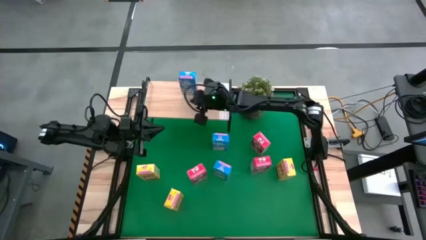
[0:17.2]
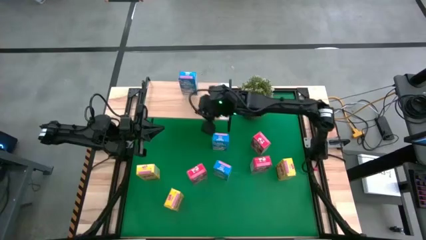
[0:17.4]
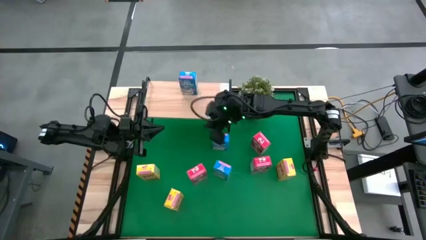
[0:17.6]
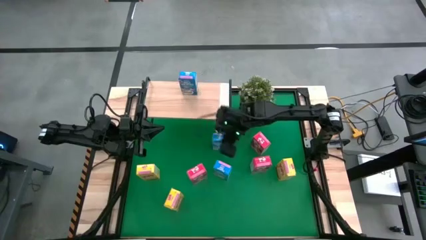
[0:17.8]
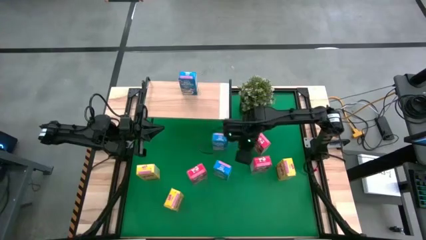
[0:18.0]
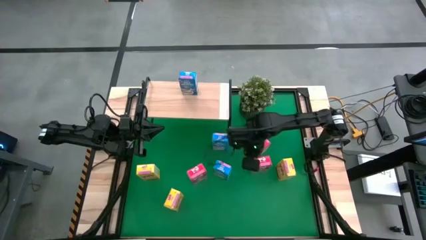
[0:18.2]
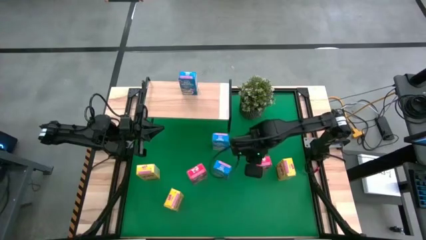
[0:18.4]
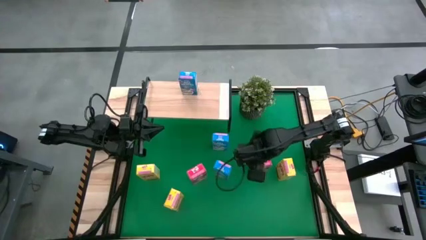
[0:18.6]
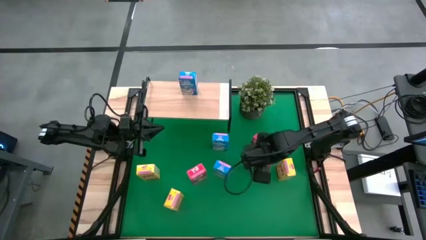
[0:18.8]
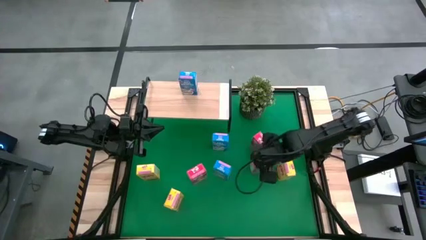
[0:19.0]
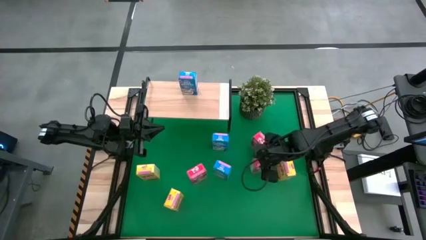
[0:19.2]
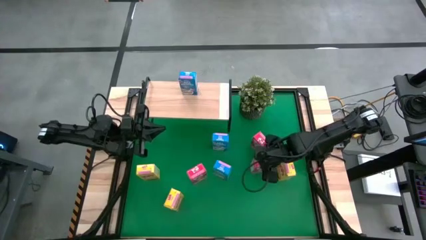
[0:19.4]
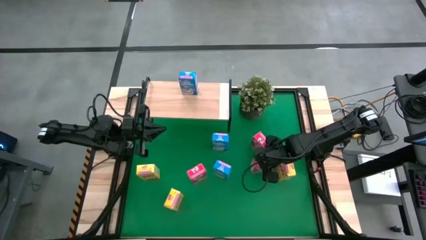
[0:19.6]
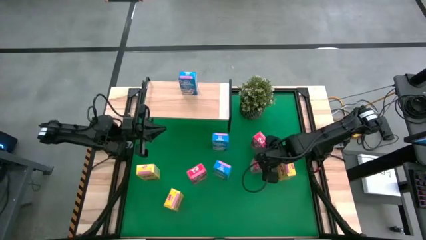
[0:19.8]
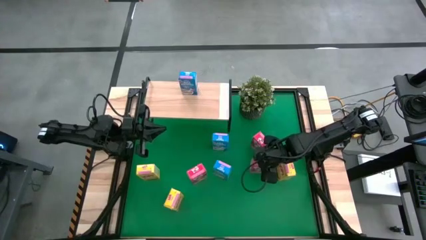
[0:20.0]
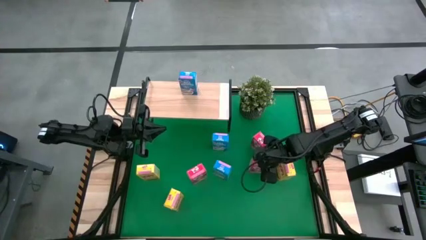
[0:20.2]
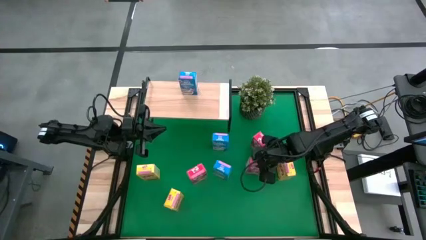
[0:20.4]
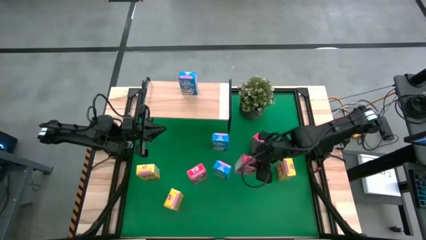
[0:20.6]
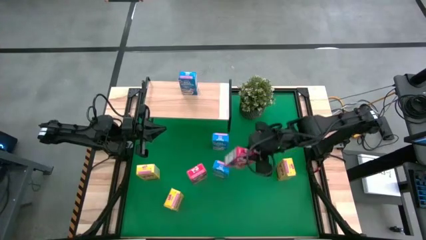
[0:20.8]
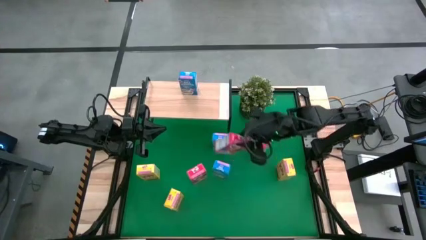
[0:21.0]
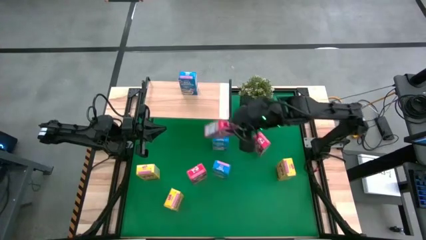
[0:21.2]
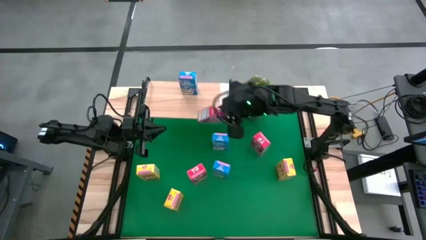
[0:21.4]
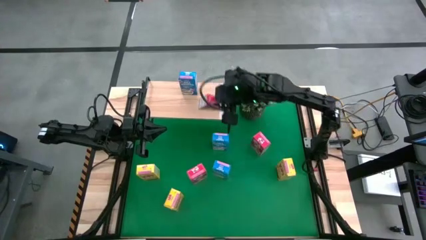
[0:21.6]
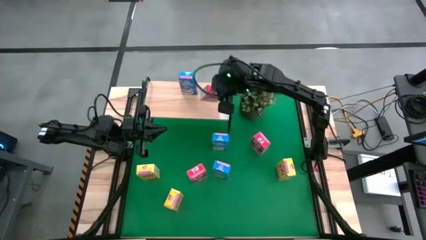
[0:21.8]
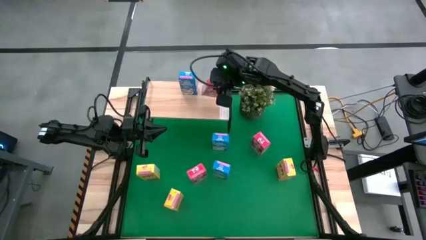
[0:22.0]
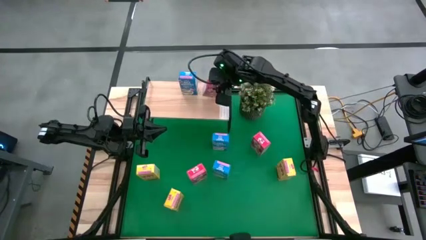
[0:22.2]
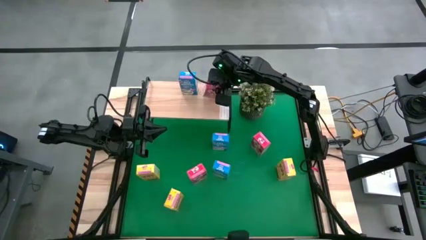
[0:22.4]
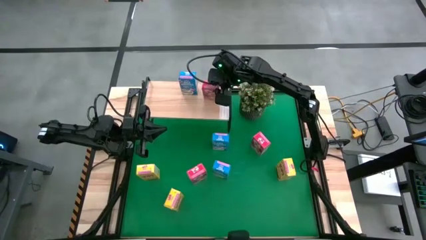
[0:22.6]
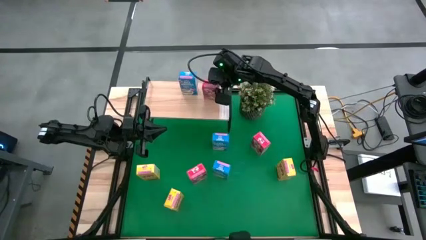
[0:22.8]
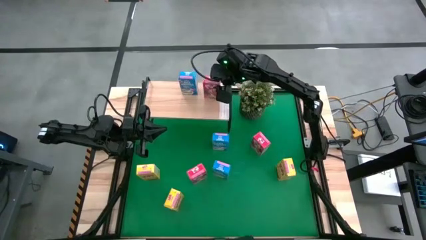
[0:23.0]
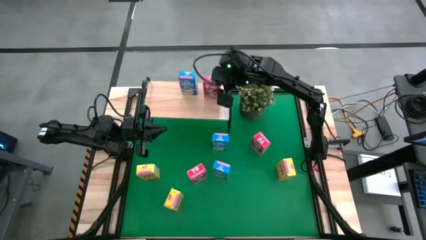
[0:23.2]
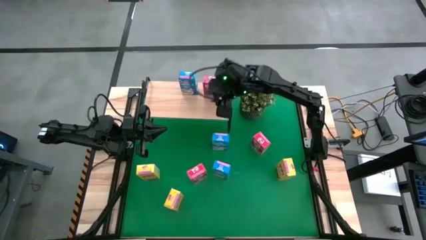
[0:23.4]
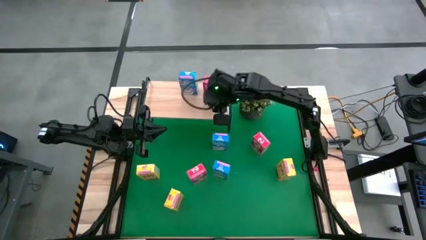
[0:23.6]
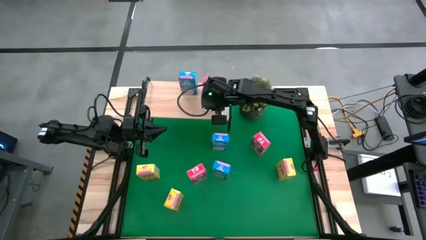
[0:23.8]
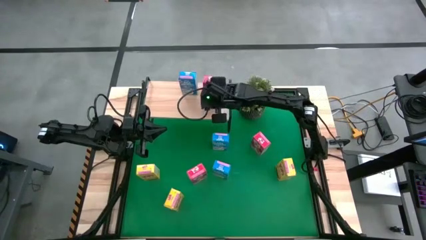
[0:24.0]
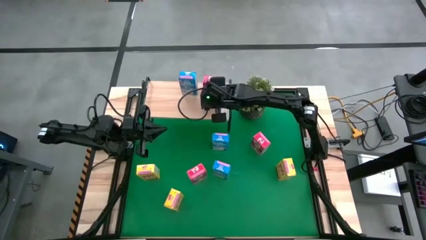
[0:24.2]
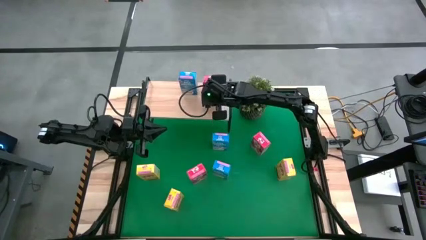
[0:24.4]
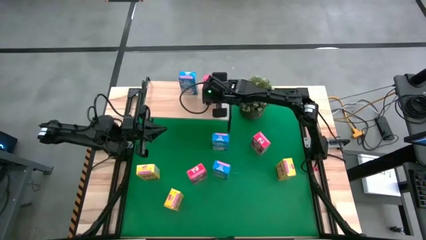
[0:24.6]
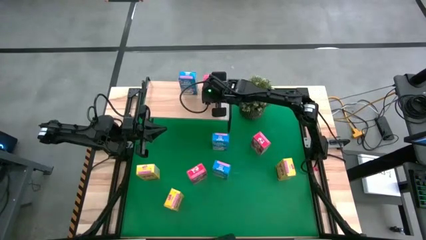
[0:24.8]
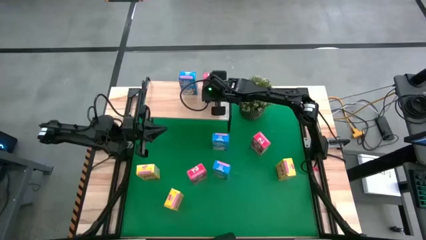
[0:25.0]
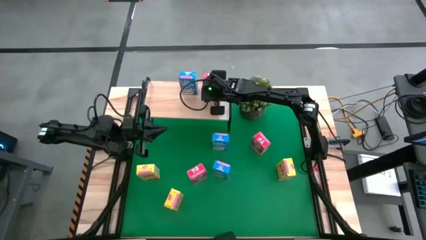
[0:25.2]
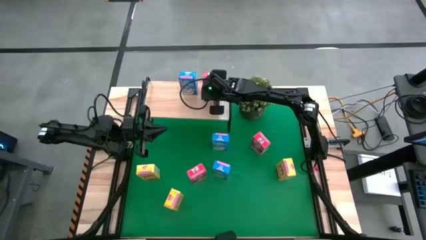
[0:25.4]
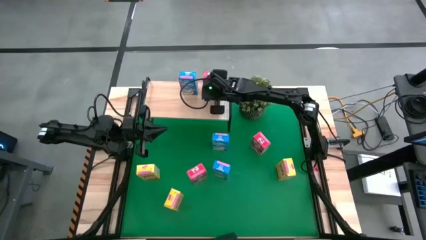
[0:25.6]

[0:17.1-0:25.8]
Task: Stack cereal on shelf
Put the bottom right red cereal box on the shelf

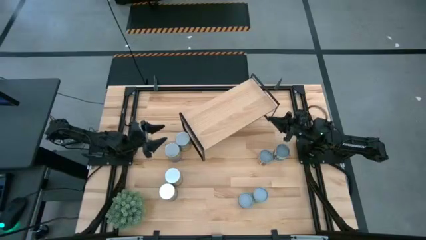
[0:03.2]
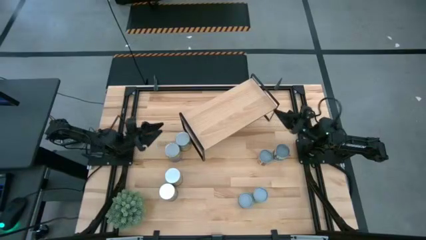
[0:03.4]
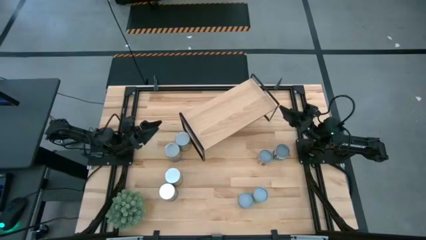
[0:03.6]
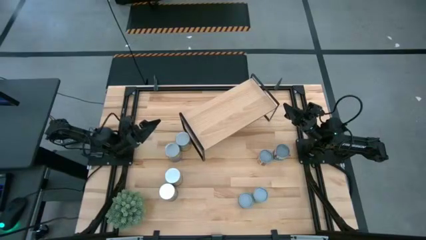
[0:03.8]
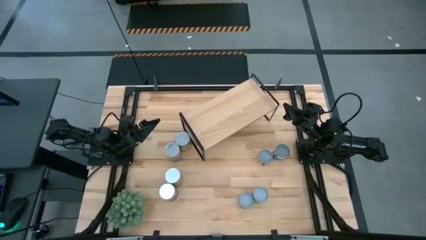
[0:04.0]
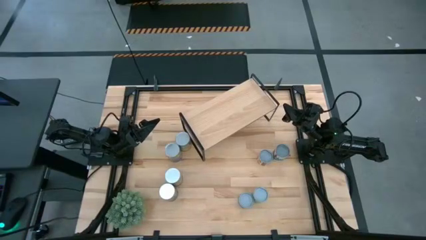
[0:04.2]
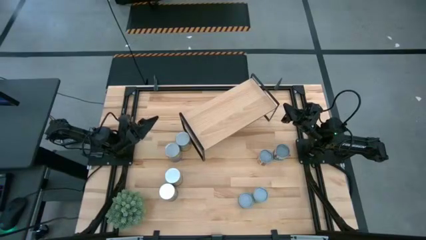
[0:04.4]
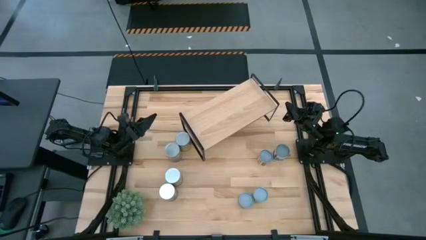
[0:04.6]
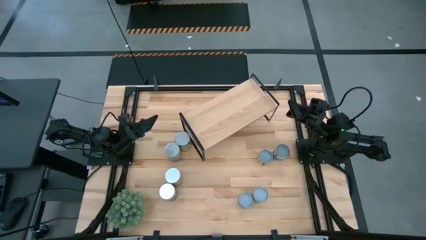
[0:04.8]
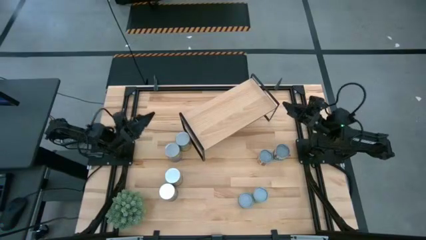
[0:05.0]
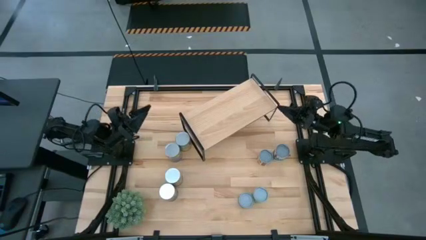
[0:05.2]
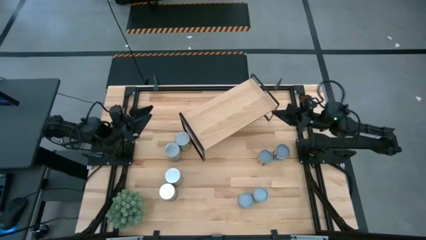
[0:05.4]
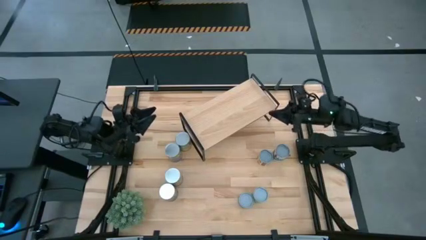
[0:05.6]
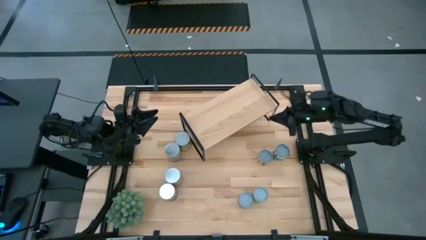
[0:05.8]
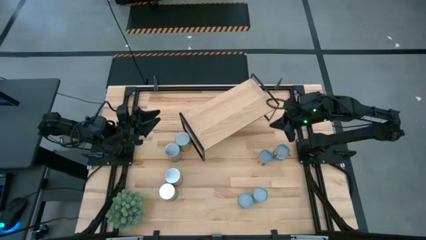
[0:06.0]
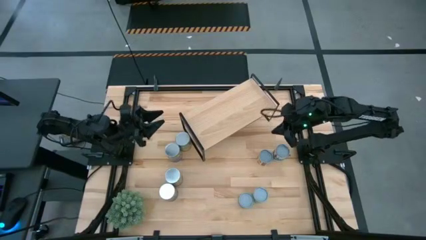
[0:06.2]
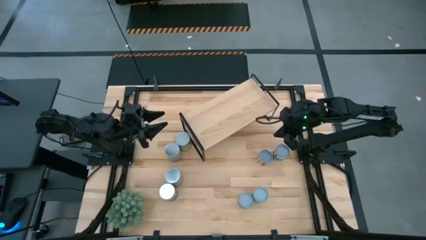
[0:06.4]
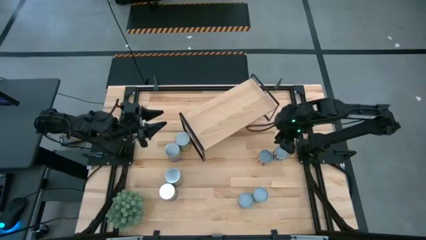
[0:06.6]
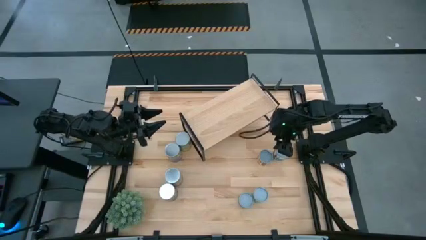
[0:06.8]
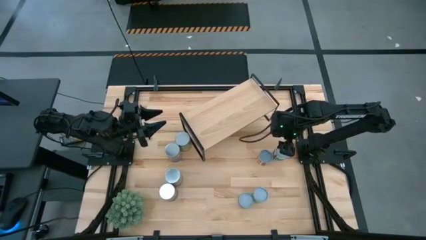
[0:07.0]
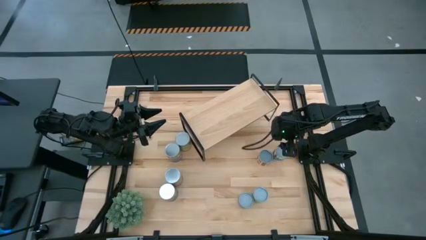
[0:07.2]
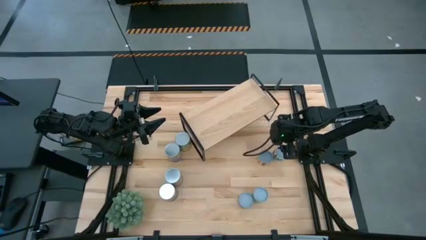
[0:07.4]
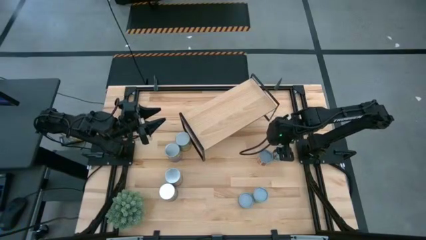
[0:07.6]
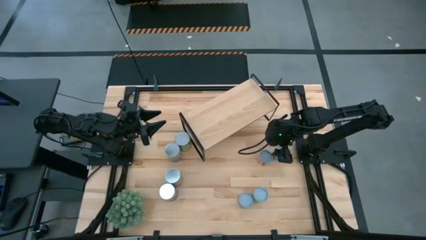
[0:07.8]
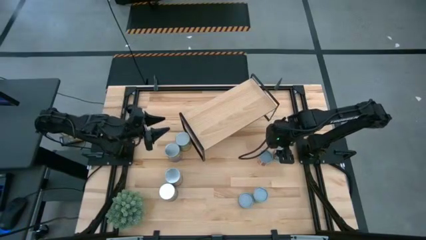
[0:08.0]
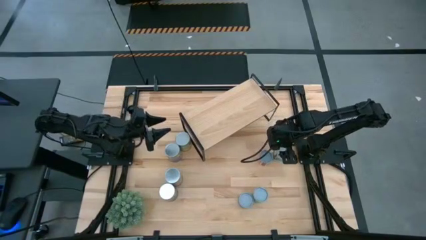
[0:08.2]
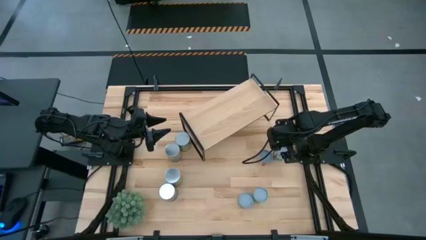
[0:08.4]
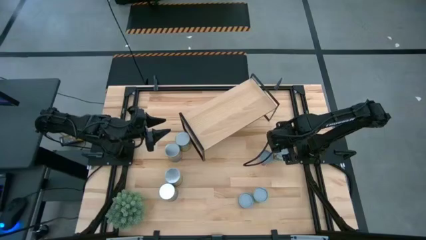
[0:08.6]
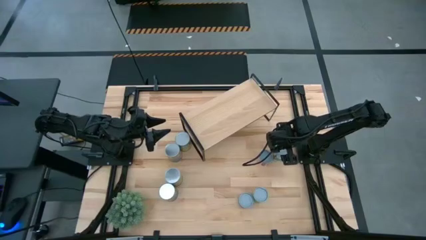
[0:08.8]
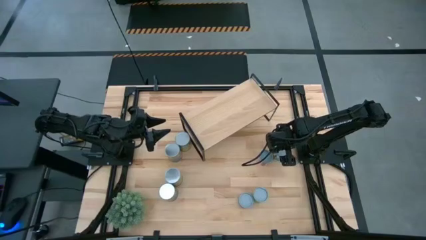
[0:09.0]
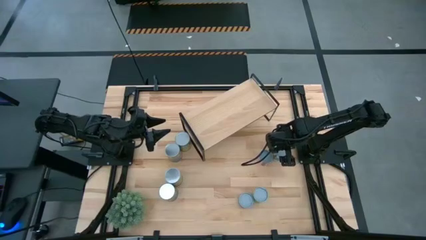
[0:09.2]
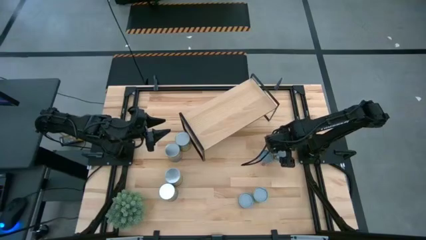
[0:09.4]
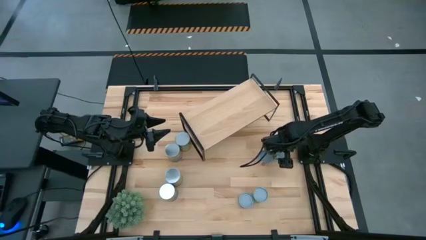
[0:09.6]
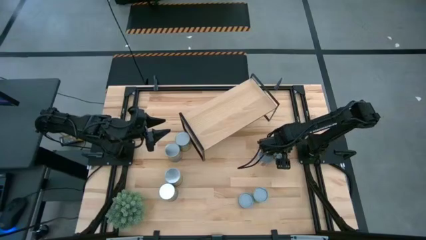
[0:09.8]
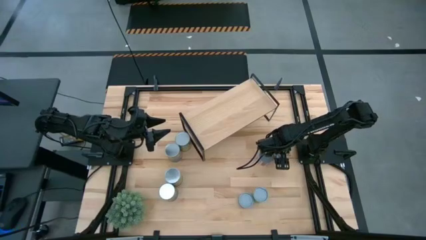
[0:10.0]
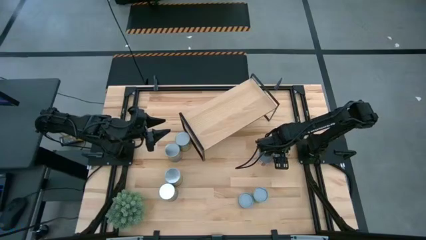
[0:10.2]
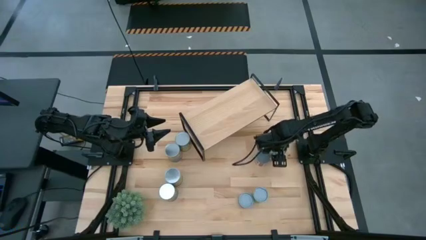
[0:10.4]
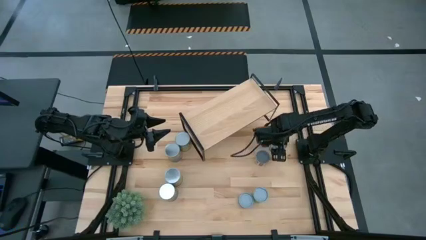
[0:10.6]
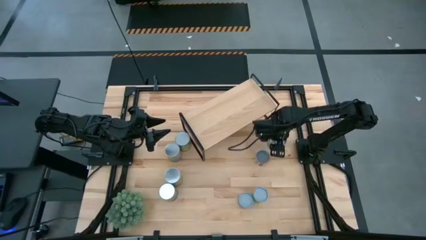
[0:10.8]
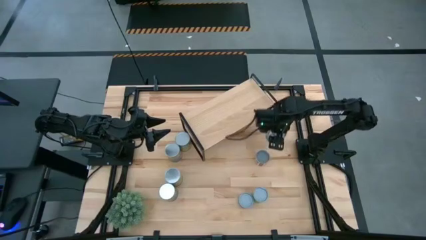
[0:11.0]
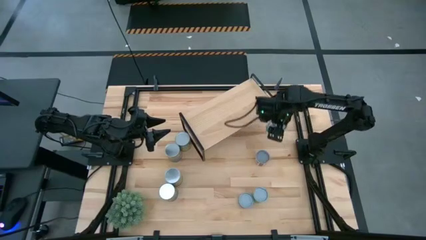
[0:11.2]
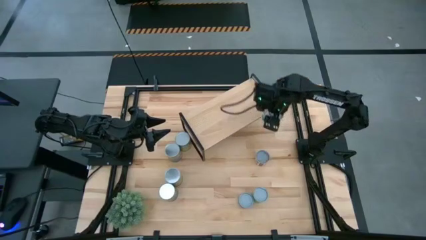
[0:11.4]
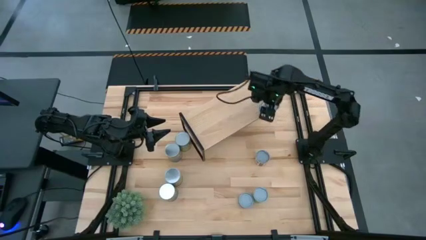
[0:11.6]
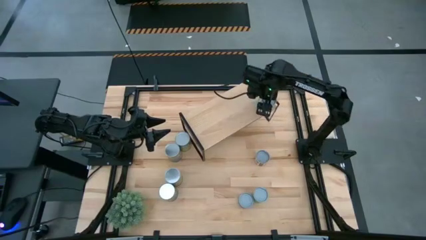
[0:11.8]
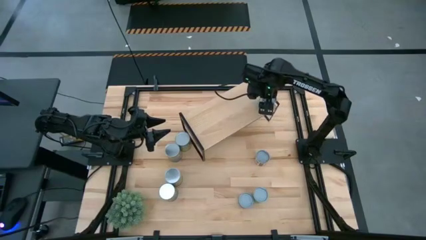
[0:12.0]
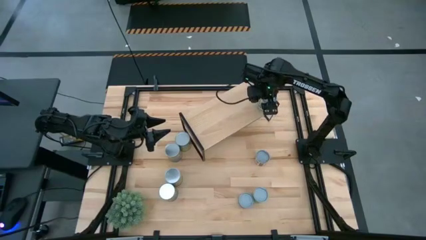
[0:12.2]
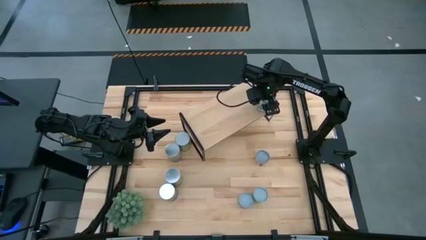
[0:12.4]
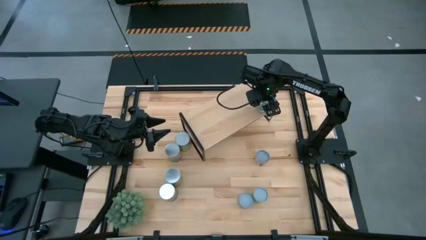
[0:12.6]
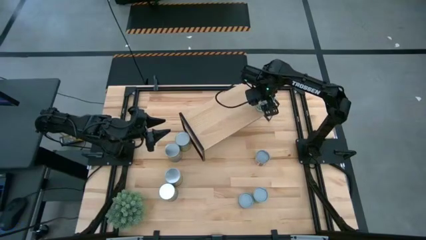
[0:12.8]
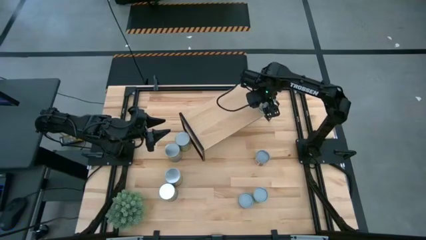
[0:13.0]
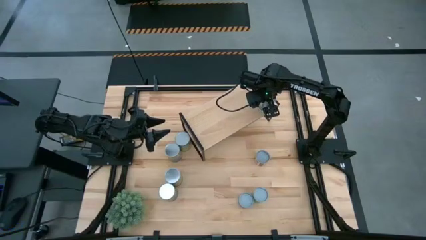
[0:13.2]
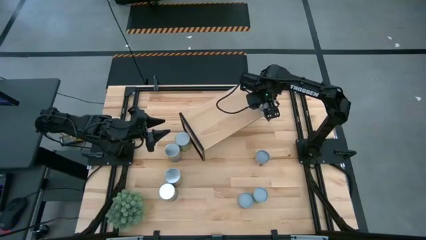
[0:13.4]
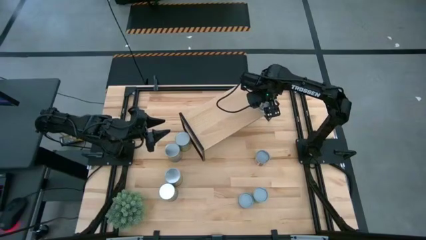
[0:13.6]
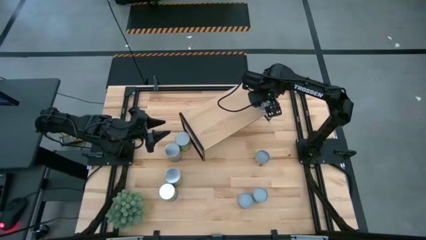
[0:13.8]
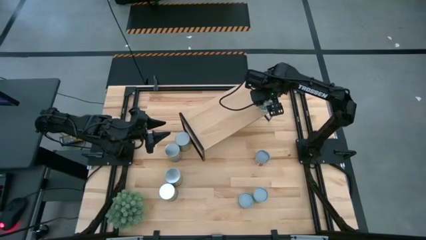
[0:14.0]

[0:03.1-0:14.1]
Task: Pick and place cans onto a shelf
Put the canned mixed vegetables on the shelf
